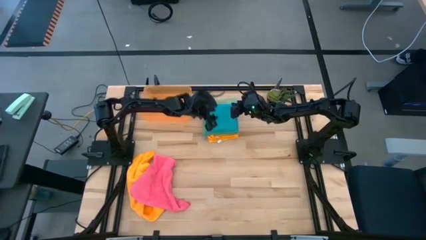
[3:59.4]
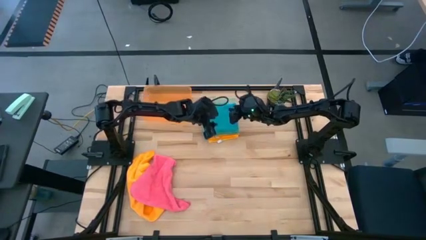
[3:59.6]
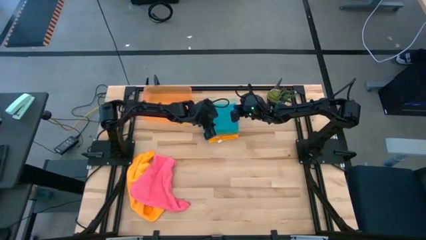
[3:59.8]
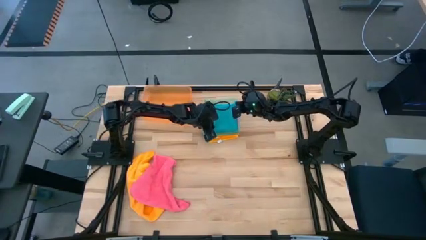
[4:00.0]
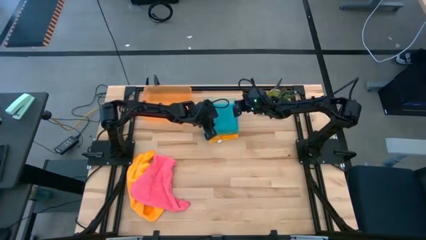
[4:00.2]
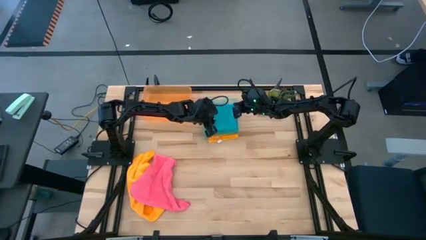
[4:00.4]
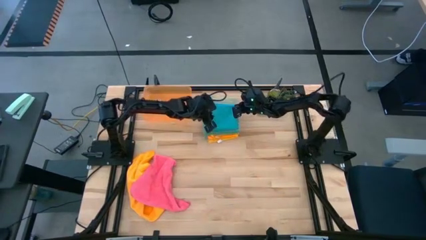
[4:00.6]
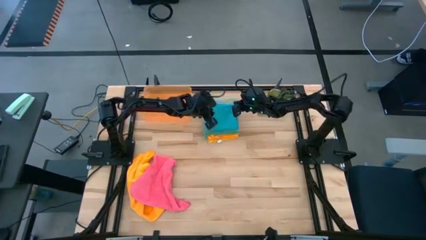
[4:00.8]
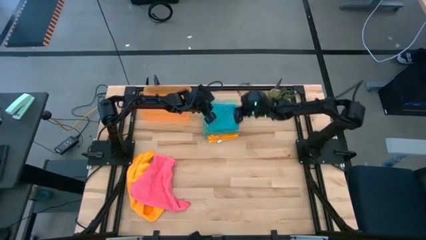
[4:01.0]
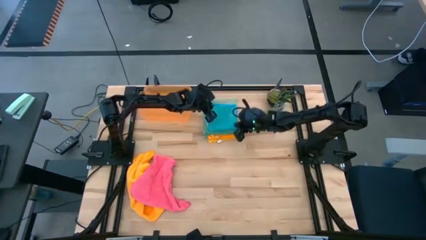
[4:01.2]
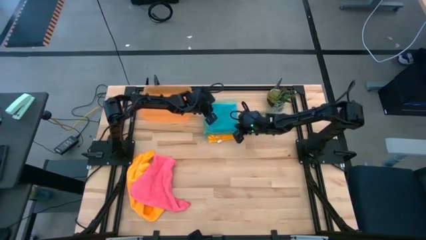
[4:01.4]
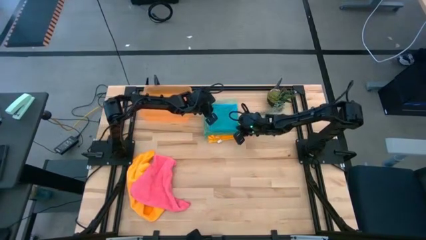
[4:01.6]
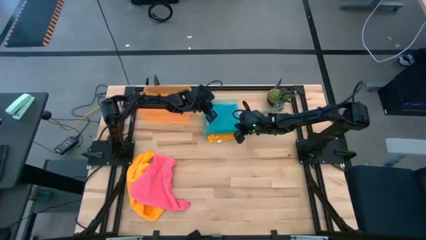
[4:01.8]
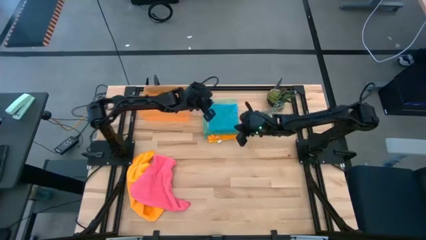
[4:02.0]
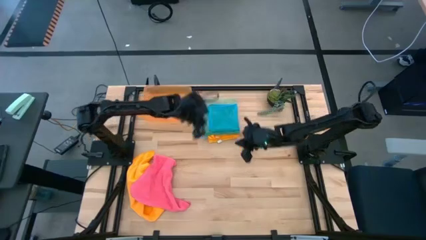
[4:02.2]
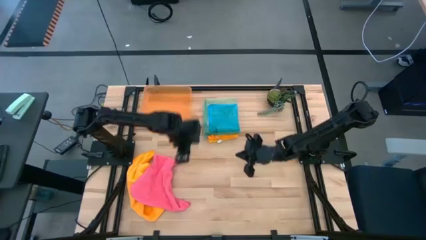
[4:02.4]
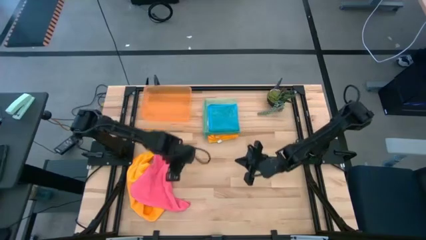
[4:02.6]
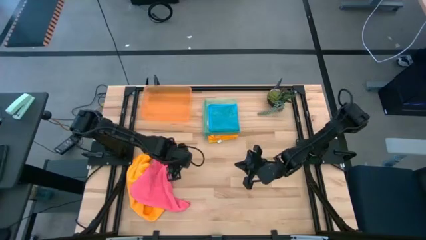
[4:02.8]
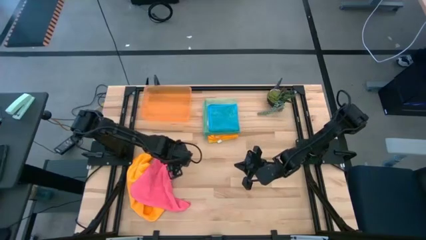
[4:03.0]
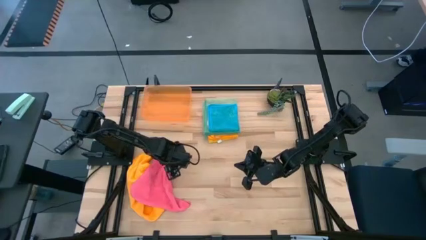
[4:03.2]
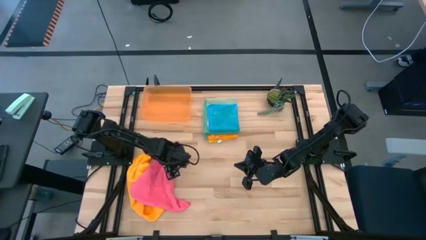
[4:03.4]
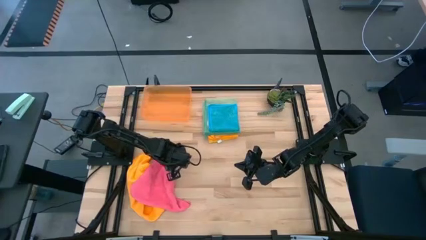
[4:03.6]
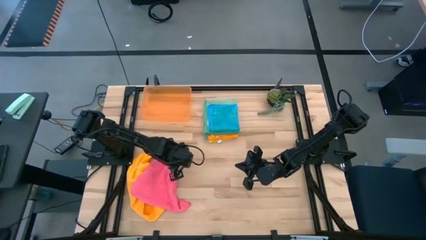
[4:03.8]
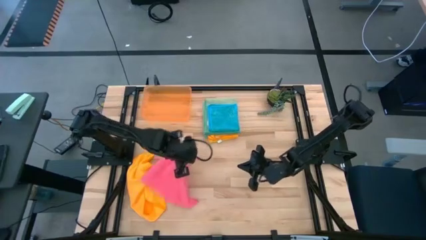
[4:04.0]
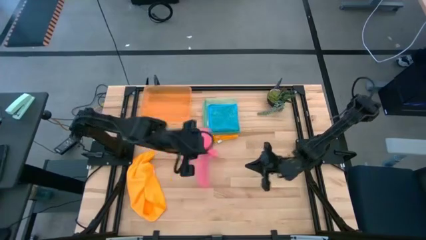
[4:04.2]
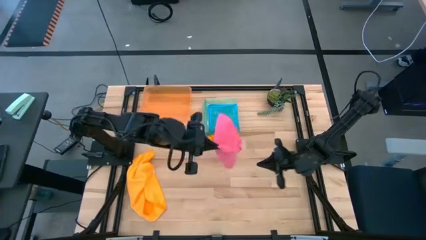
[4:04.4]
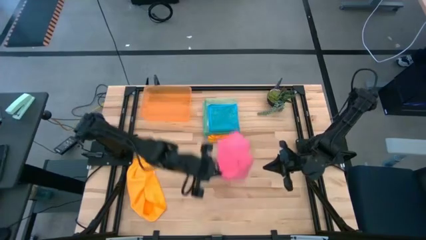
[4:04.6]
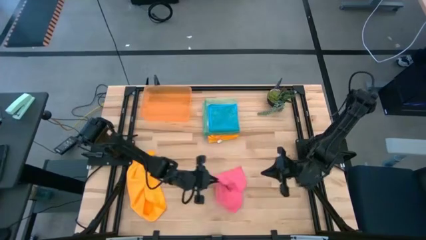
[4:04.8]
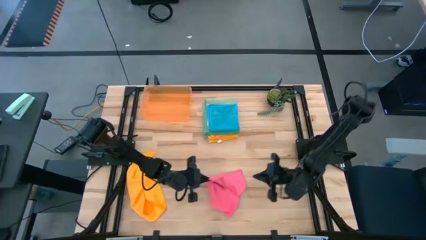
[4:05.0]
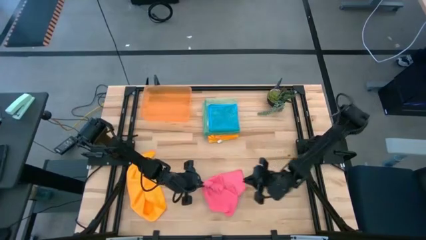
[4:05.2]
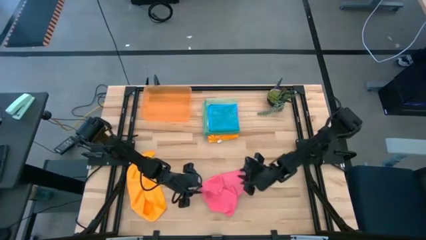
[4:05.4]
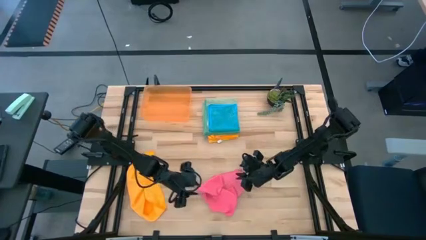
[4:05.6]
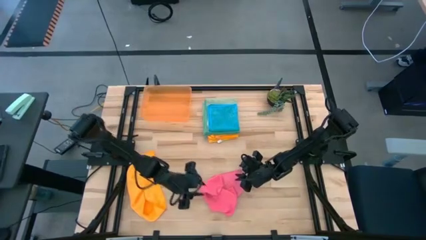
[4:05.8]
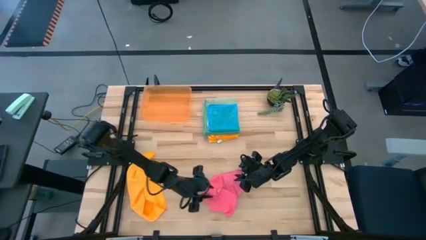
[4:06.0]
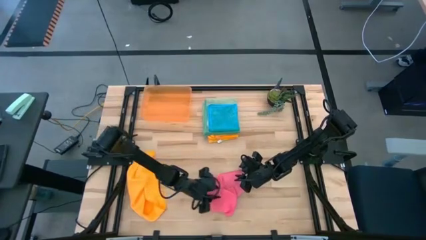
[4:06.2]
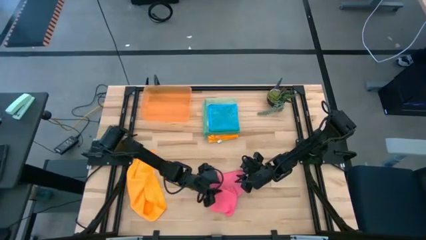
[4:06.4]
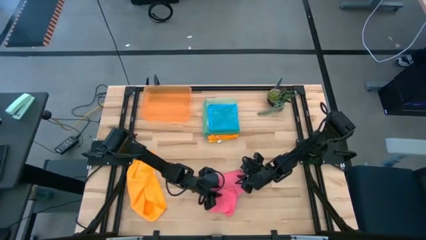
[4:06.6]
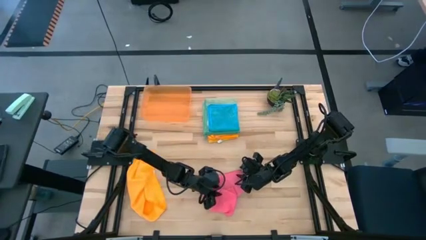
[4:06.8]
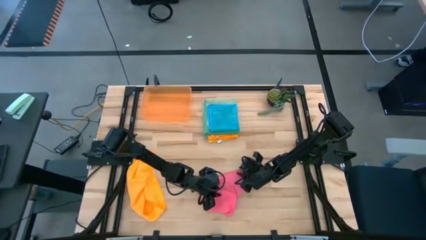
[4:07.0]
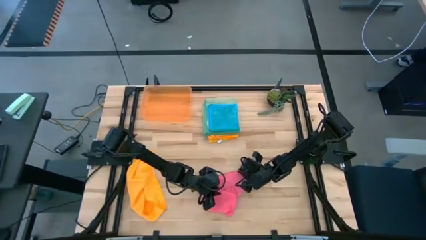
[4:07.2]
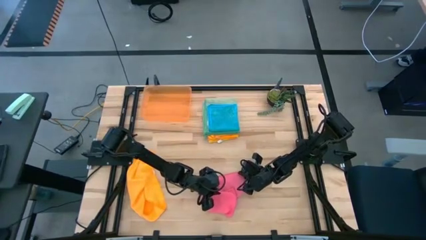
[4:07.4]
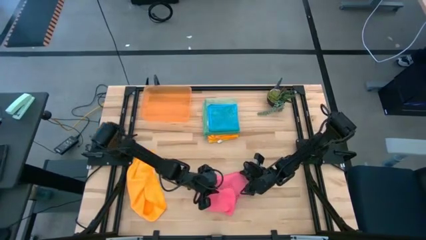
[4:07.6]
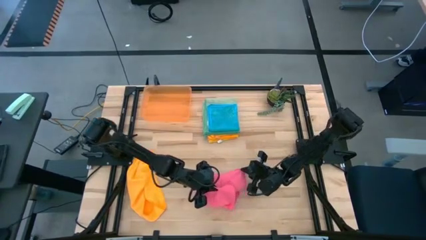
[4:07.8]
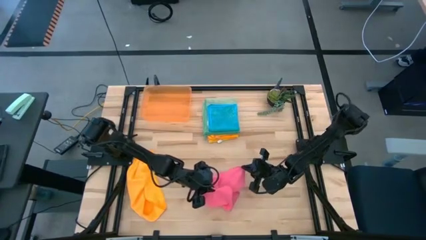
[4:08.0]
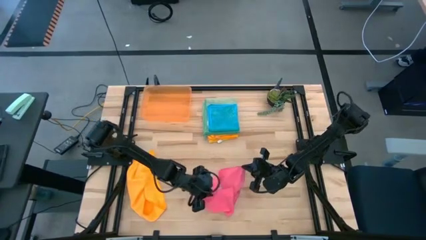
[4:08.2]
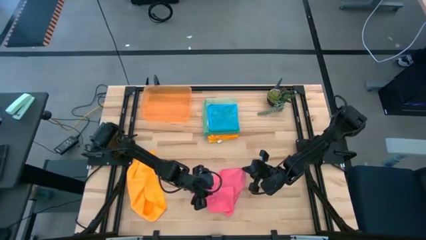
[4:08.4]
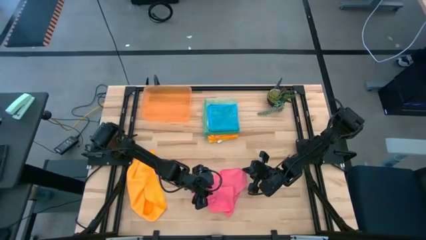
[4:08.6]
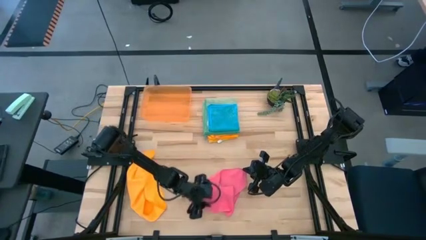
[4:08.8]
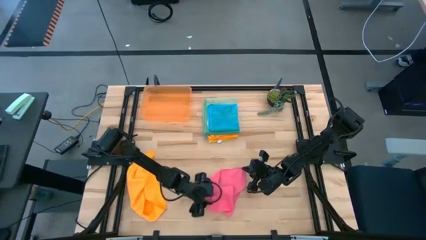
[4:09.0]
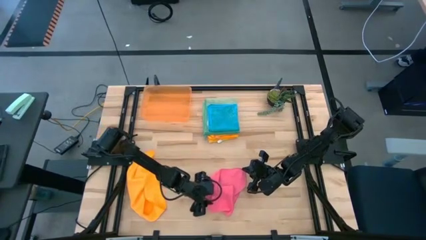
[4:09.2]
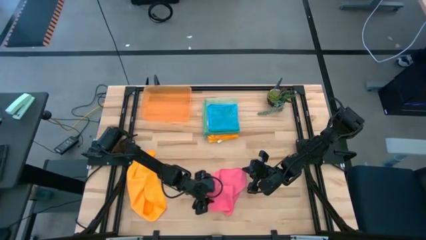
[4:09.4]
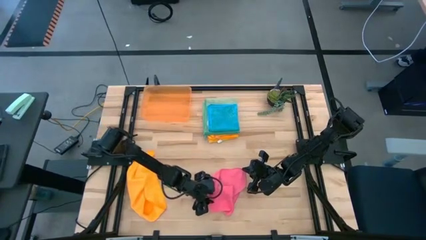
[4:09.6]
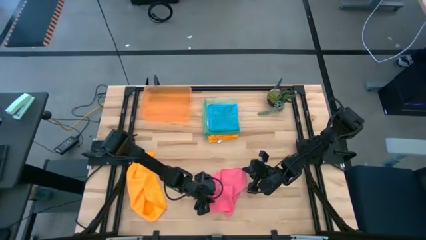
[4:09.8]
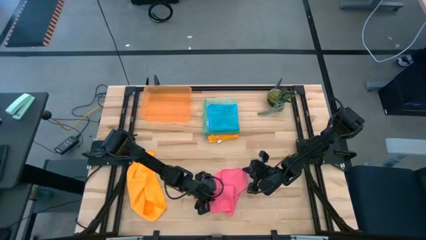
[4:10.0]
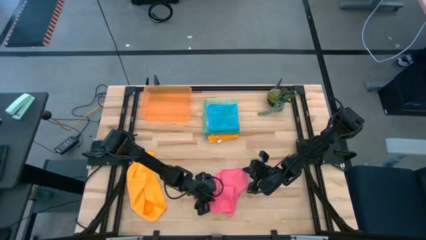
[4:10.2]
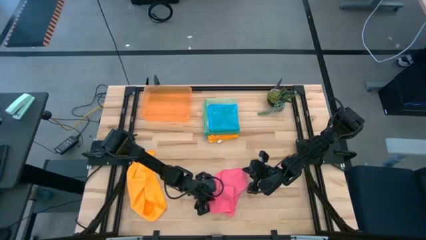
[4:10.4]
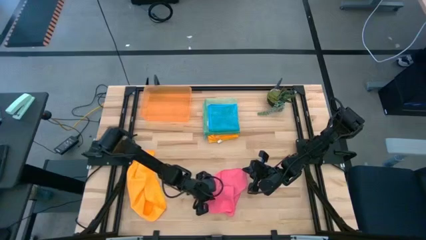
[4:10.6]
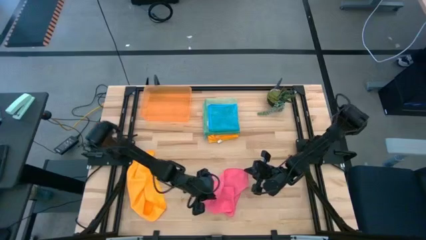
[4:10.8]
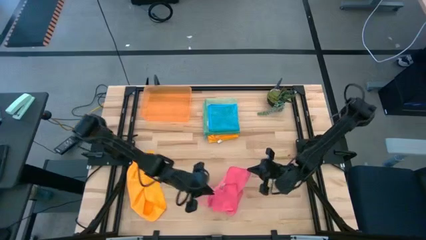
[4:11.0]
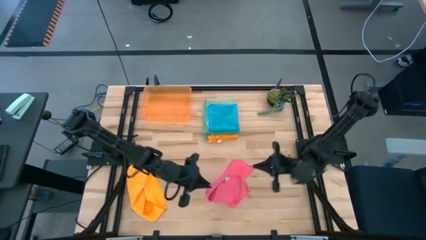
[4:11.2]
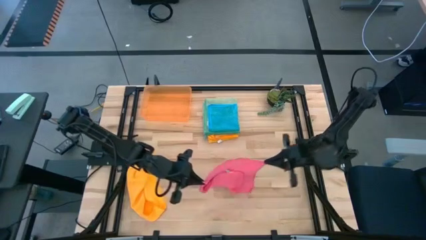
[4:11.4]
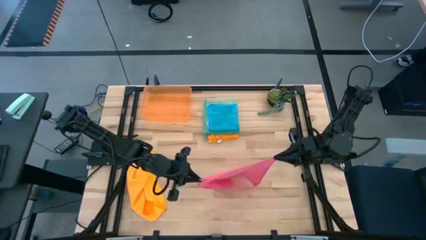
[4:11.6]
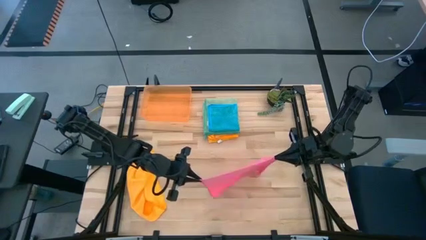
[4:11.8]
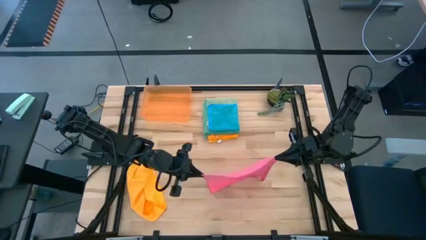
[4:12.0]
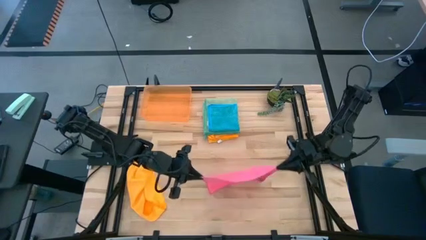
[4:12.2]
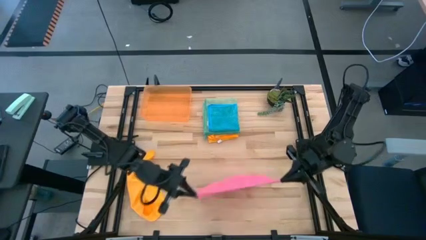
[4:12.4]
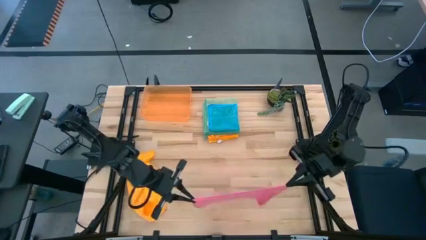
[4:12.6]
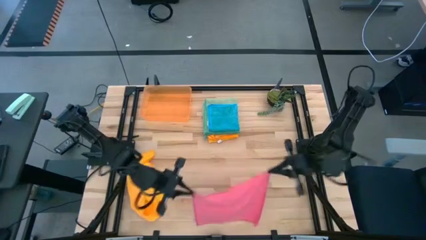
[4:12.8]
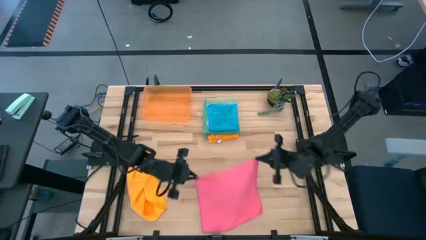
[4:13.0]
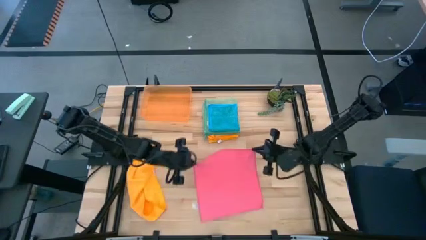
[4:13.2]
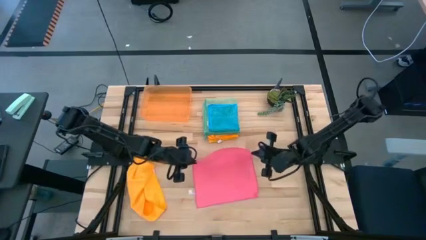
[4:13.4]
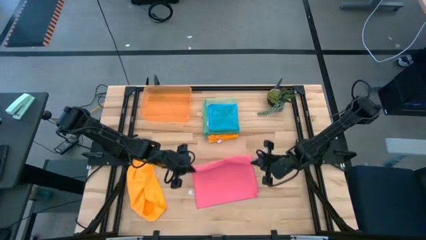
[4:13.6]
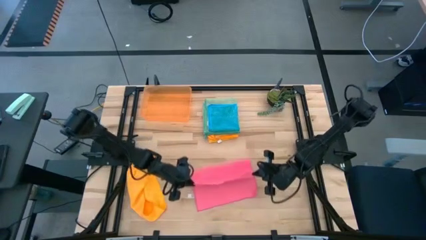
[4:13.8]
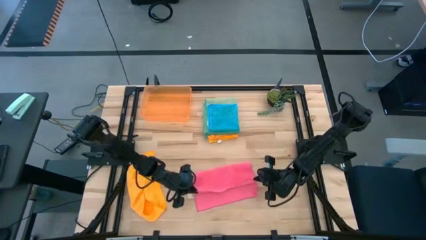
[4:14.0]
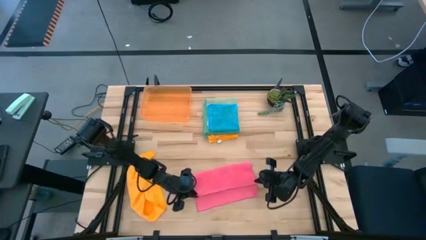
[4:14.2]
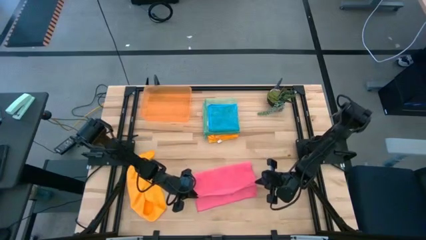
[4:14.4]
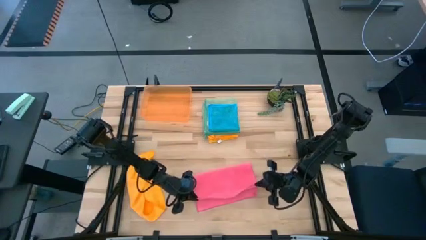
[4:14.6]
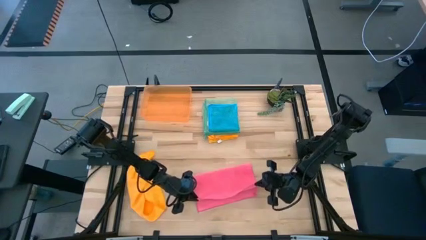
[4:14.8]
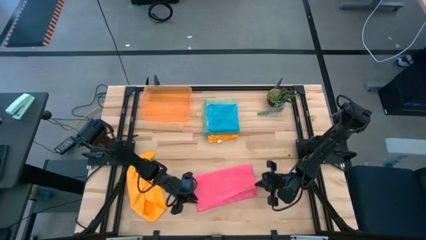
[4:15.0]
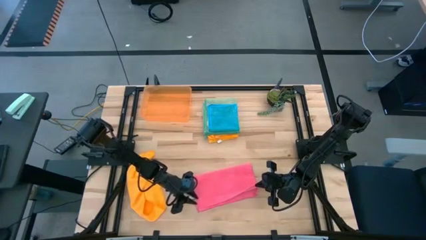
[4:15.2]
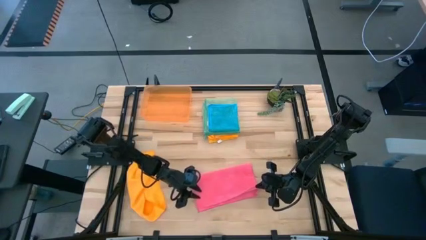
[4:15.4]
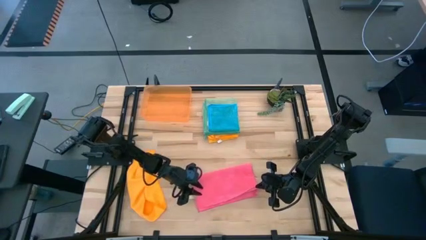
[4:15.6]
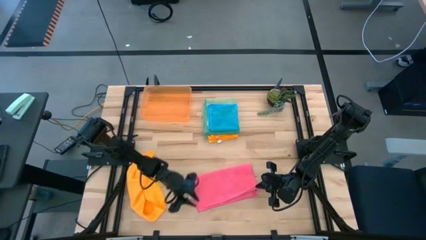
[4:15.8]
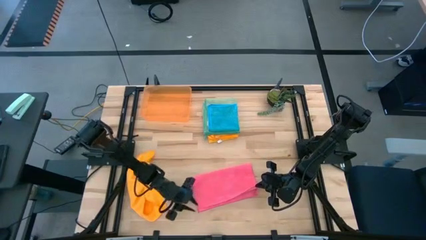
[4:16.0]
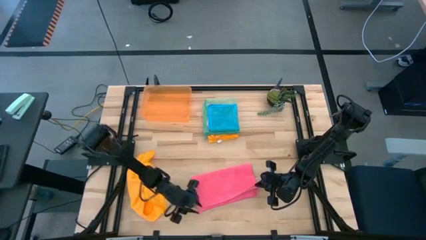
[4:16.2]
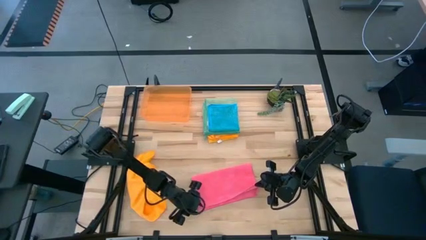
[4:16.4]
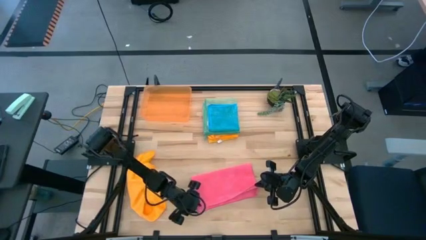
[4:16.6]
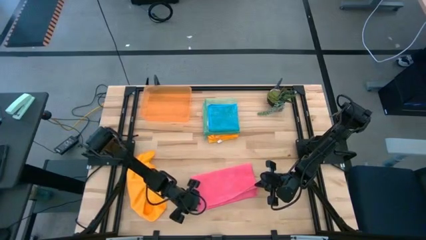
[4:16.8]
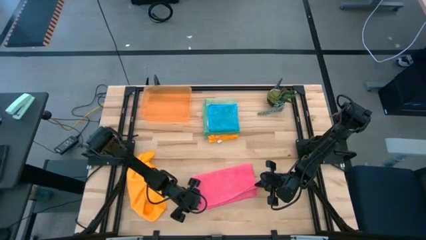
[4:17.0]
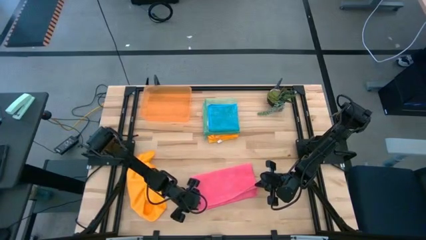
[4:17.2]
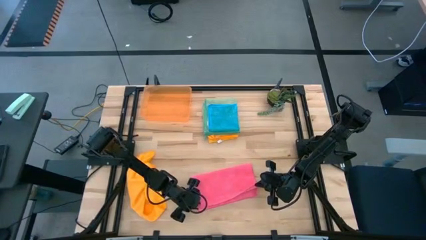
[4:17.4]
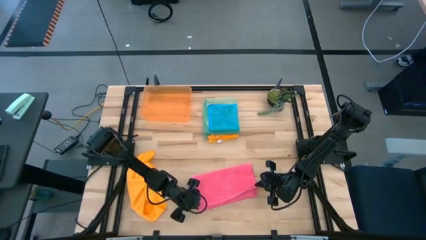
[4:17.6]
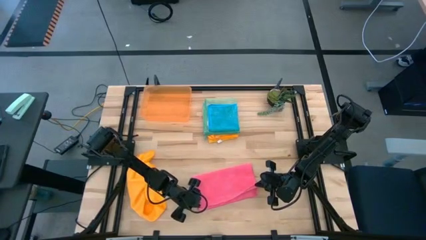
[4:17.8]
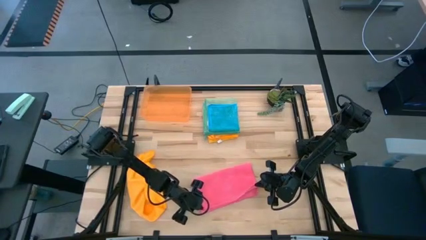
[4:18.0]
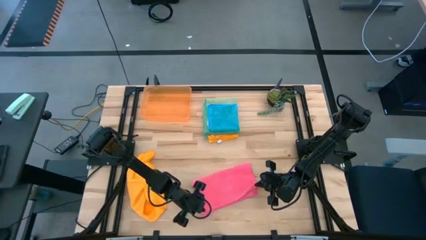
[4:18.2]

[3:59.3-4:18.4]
Task: Fold microfiber towels
Fold the pink towel
